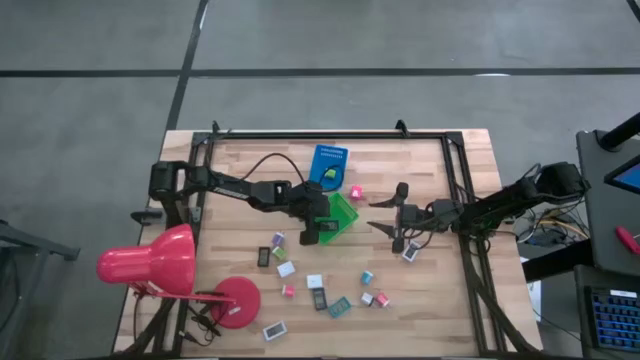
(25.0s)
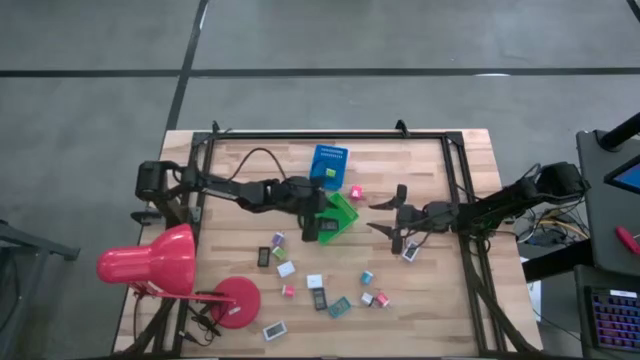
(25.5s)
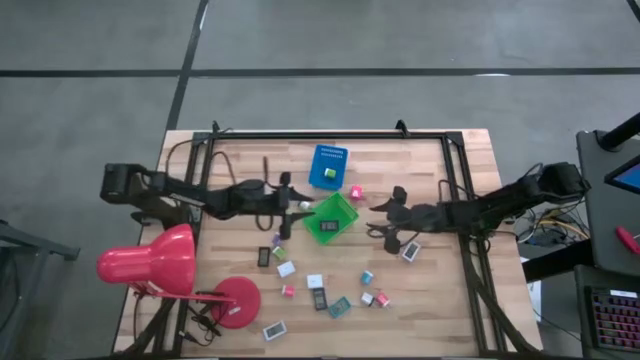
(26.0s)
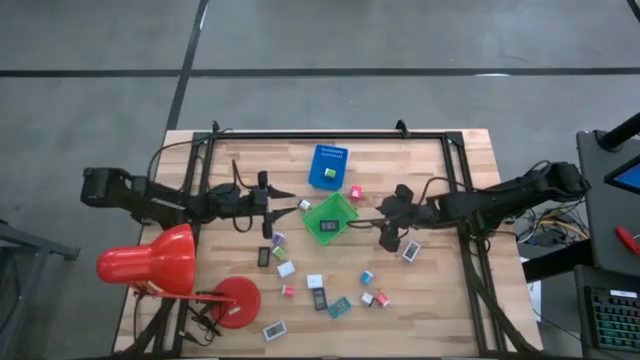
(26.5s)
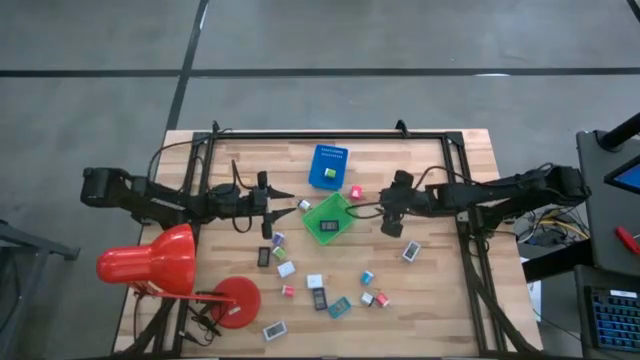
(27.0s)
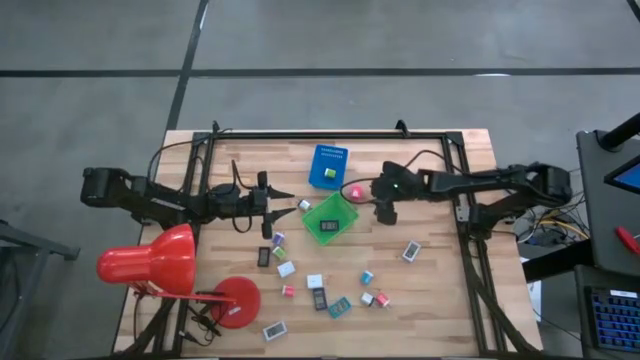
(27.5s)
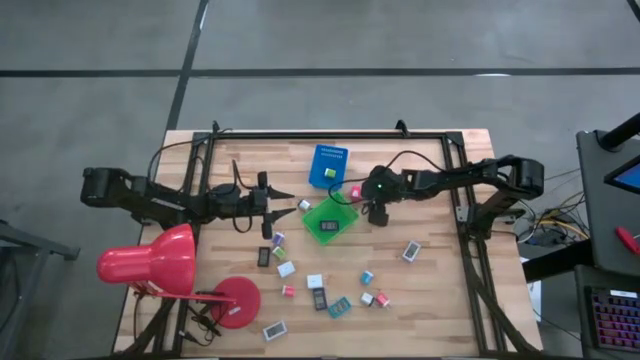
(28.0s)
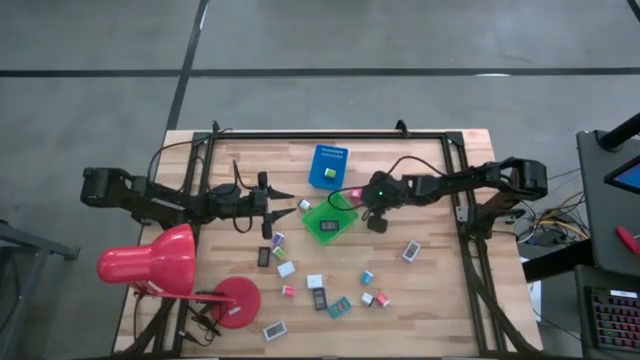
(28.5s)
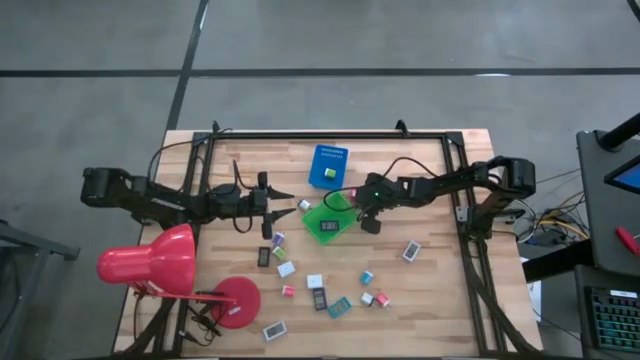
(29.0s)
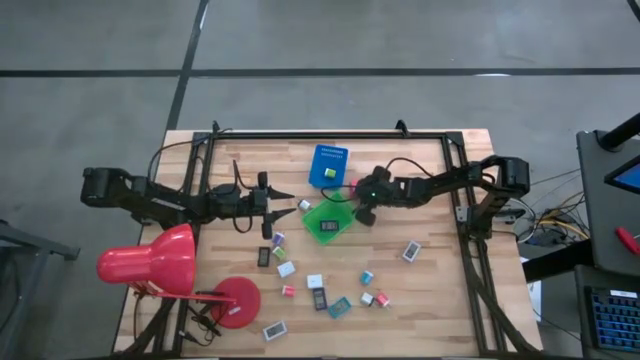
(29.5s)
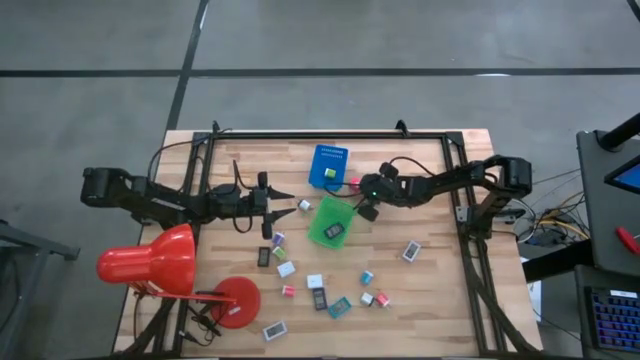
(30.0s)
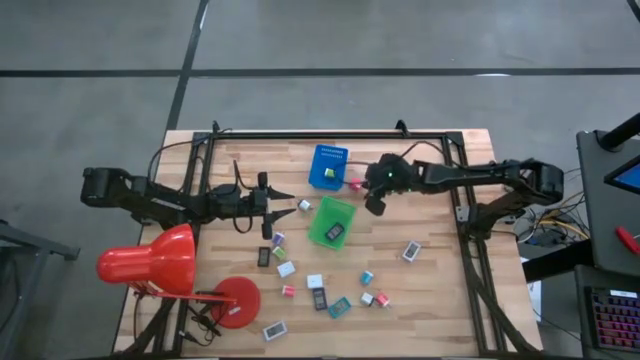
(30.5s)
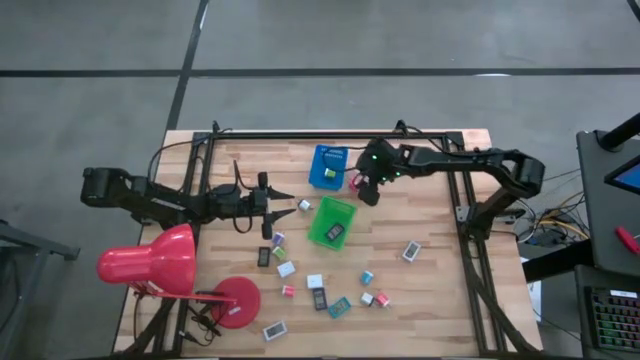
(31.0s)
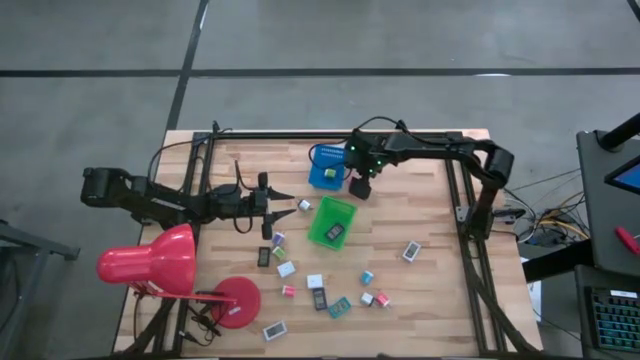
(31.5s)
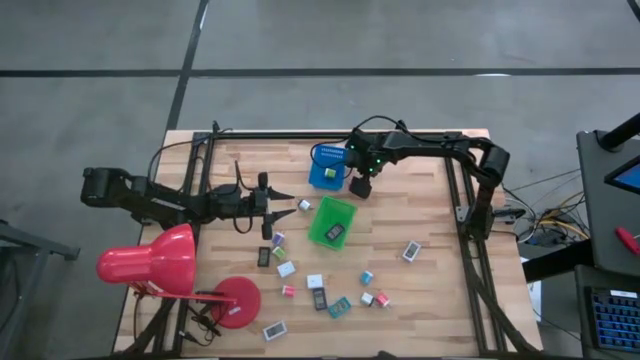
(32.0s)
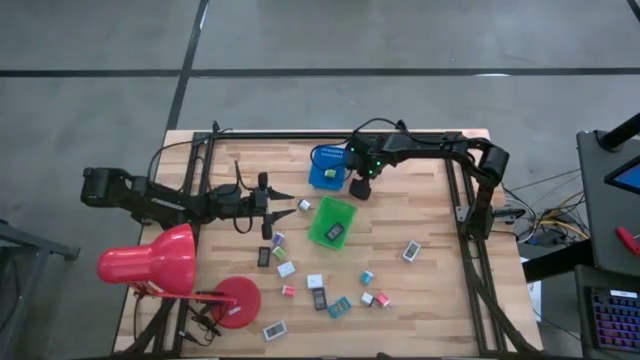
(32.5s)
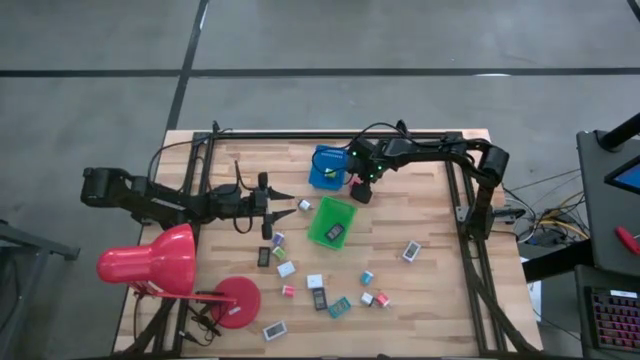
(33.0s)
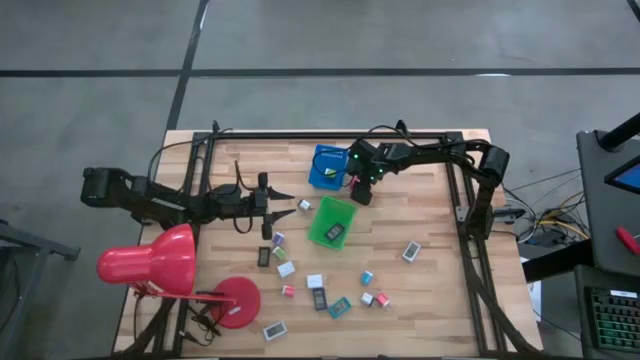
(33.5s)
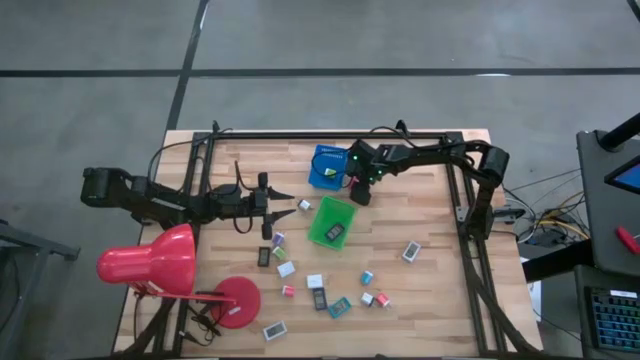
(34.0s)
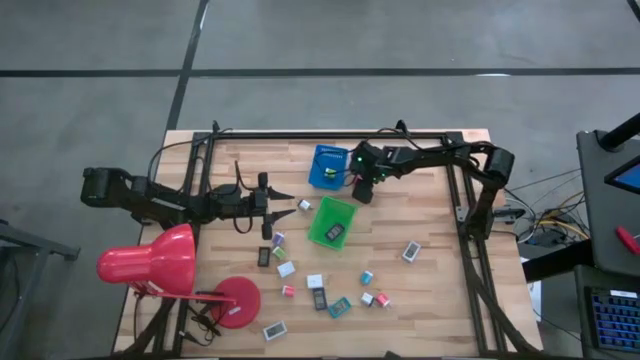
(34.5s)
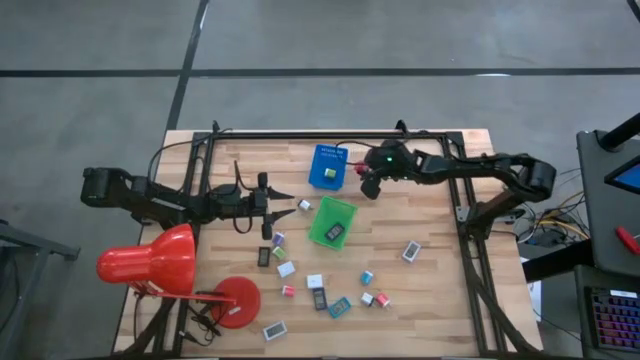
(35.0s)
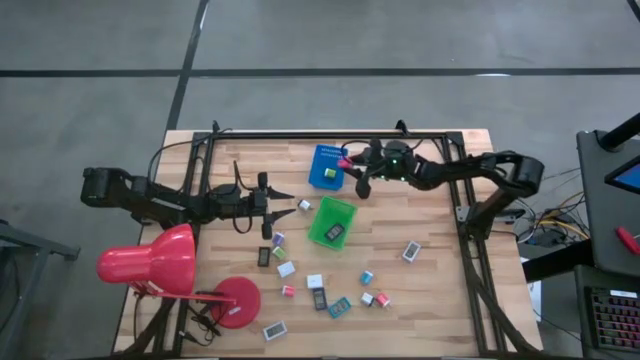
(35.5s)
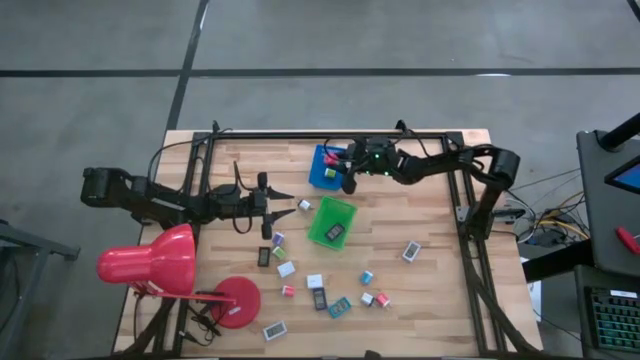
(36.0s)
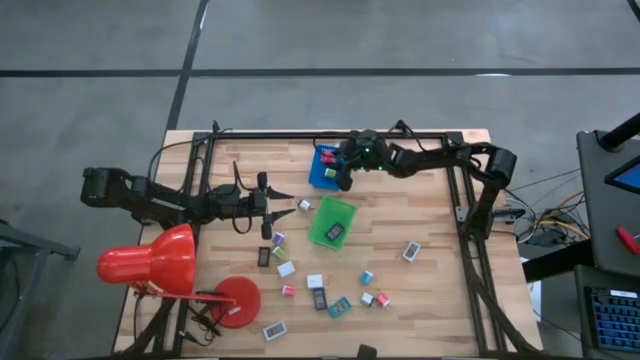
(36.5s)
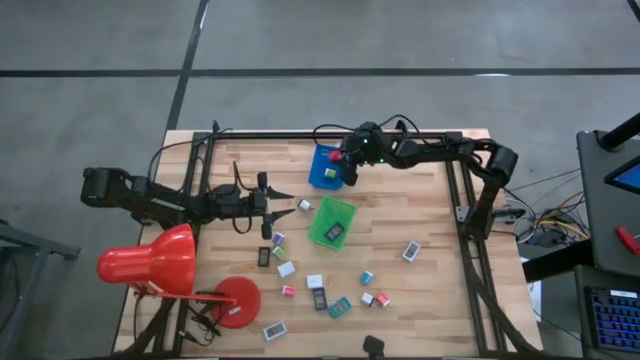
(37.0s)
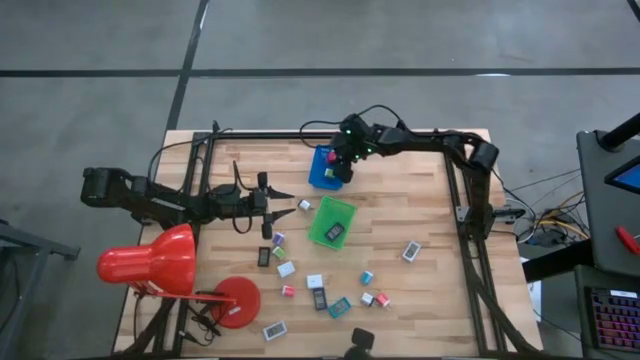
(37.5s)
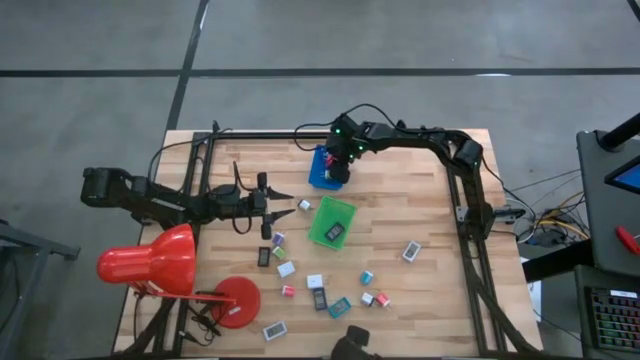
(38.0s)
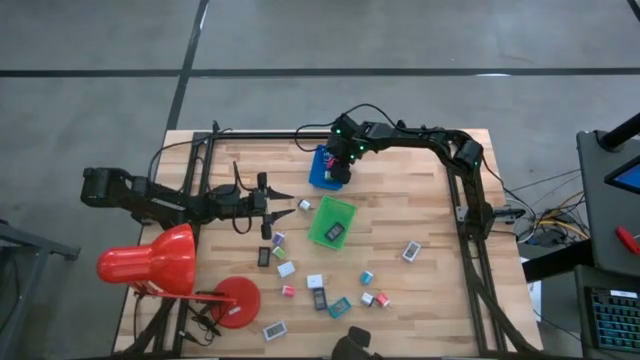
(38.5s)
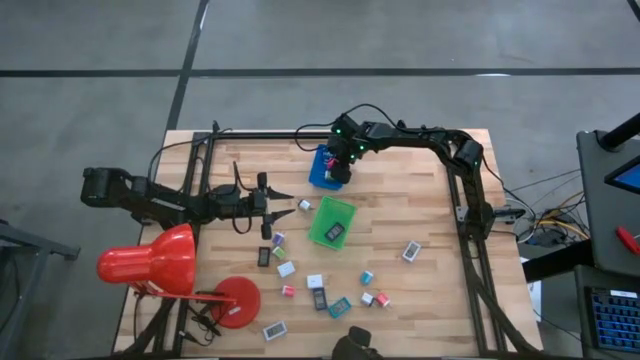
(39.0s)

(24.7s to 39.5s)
Task: Pick & Place Office items
Put the big pink charger adapter into the blue bin

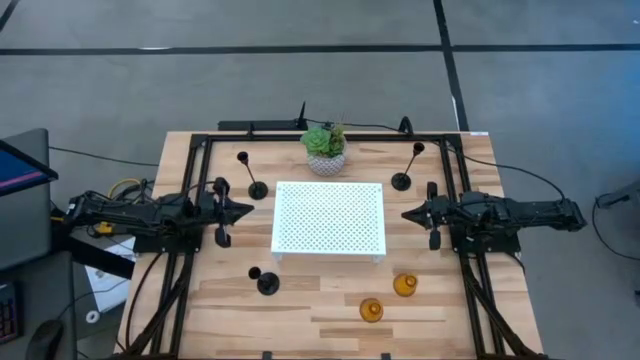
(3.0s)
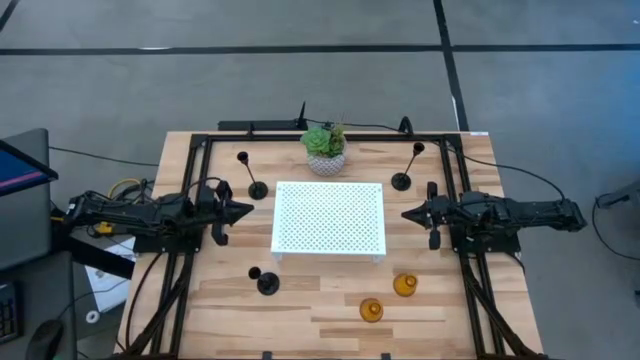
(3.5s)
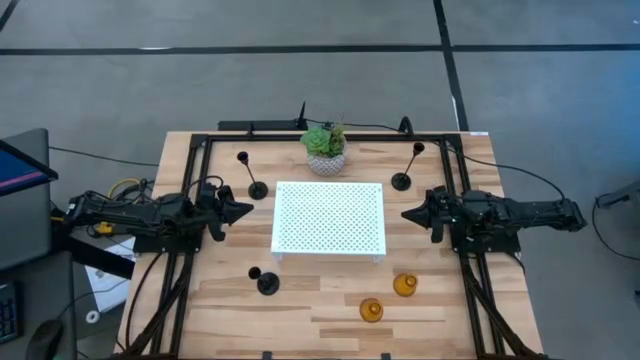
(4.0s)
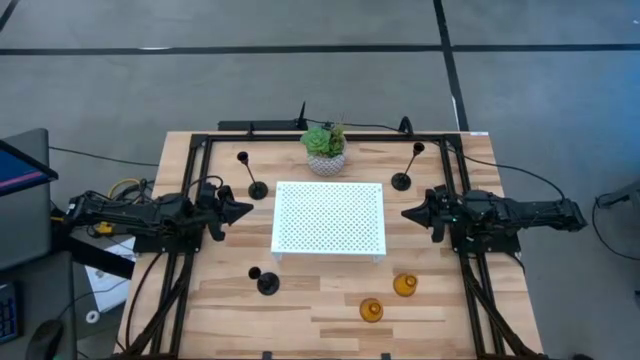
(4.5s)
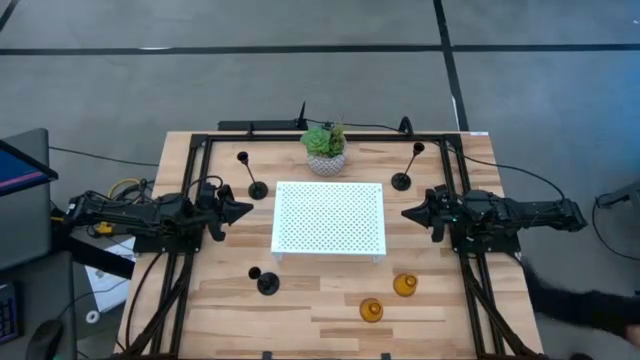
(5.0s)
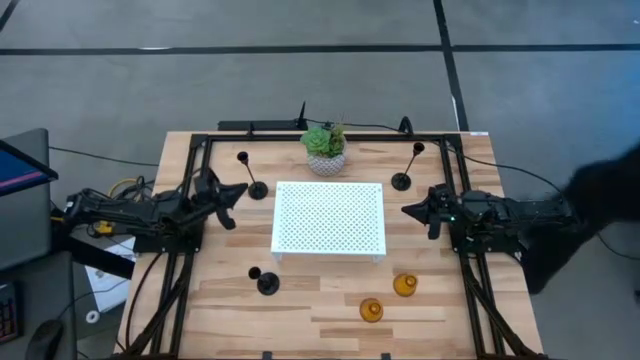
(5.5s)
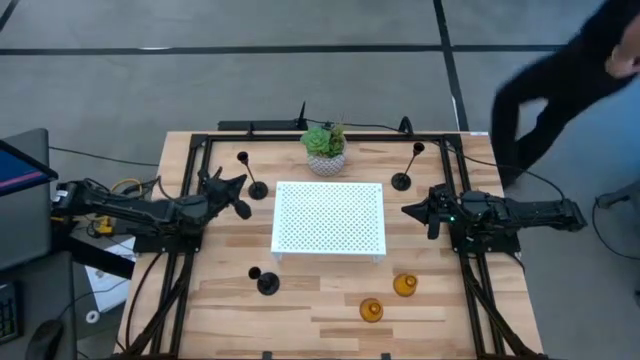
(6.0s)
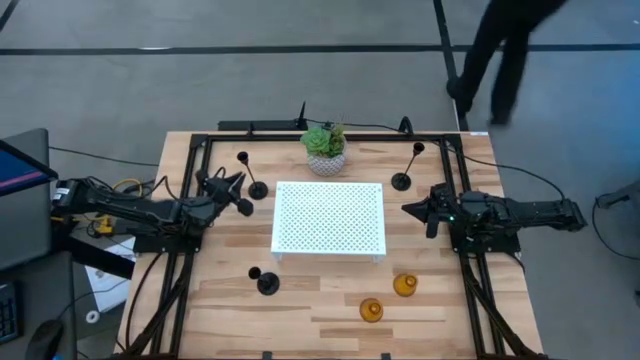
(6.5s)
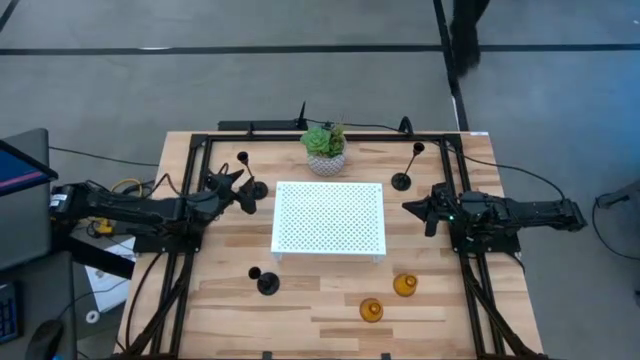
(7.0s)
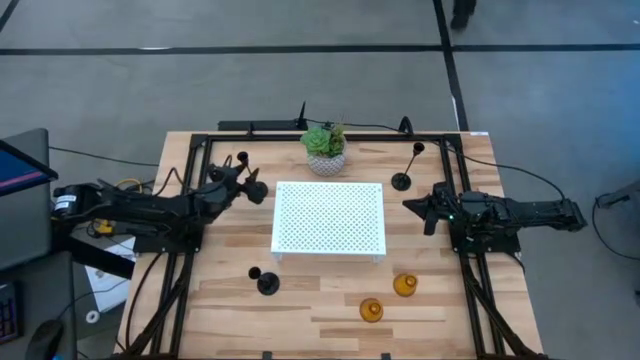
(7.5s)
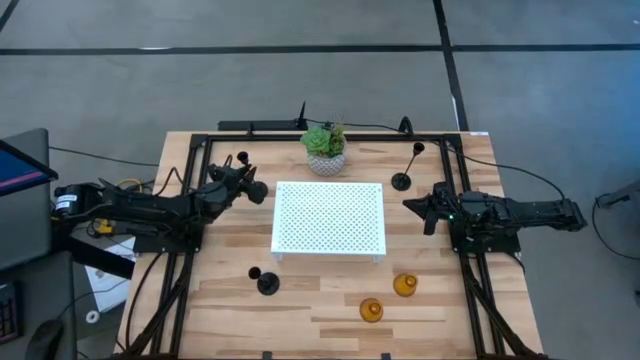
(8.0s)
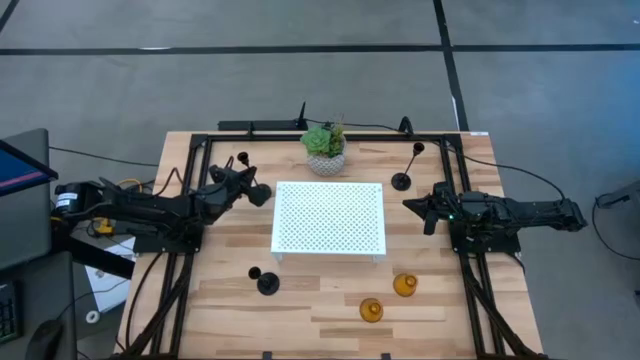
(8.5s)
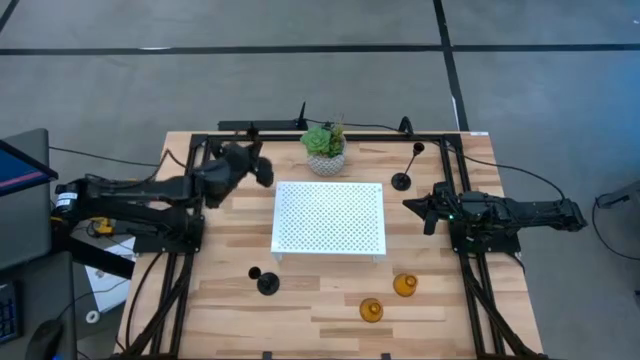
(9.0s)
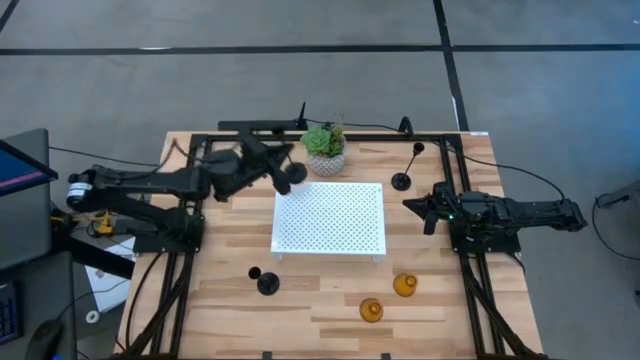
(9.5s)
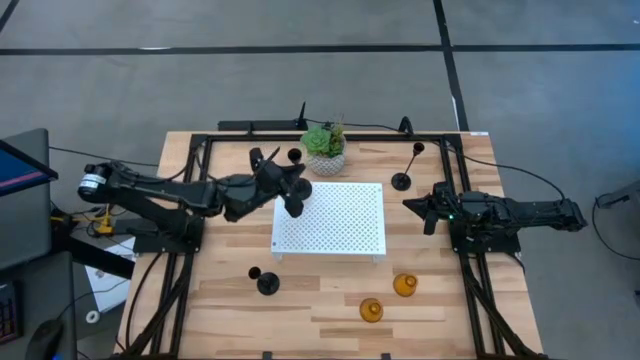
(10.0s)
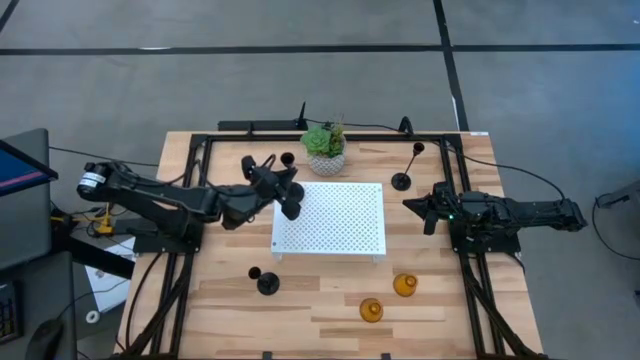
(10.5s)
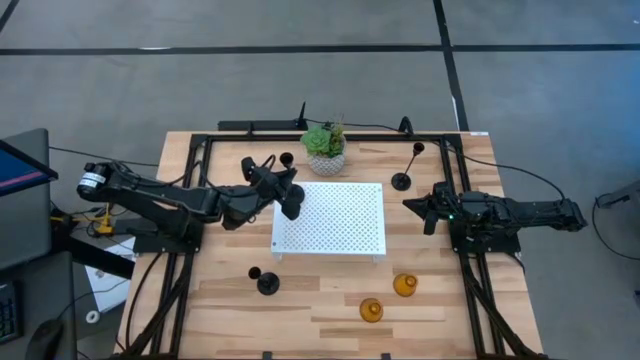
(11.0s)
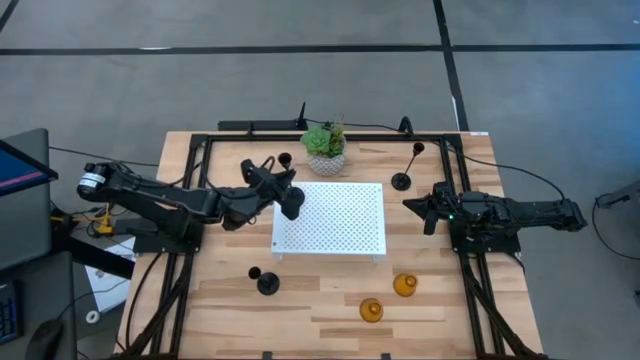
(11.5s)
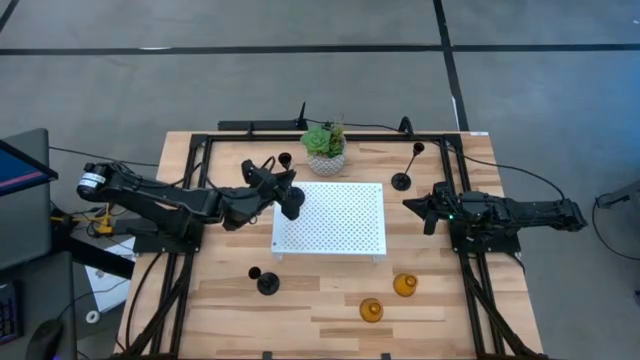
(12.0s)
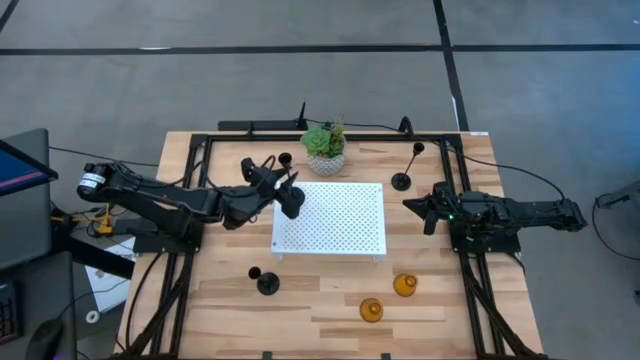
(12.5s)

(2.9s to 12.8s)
Task: Pick & Place candle stick holders
Put the top left black candle holder on the shelf
